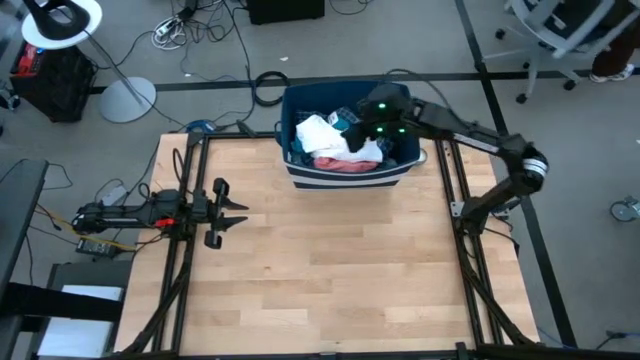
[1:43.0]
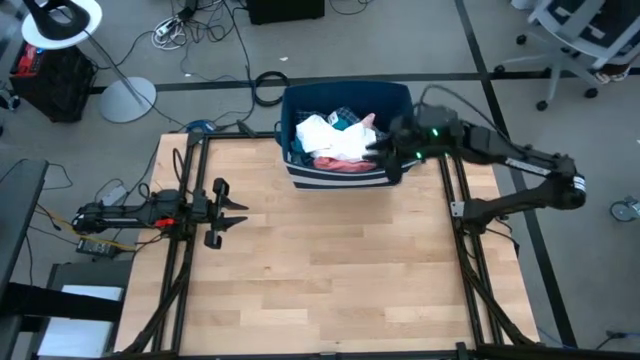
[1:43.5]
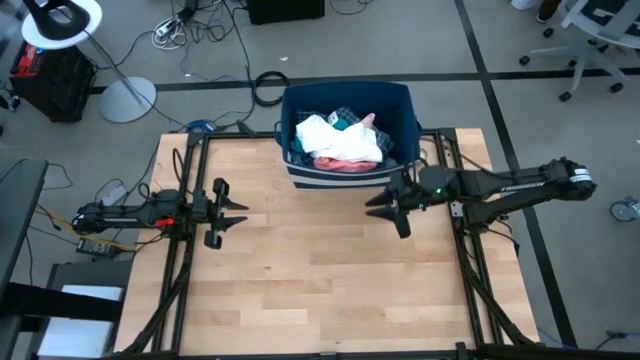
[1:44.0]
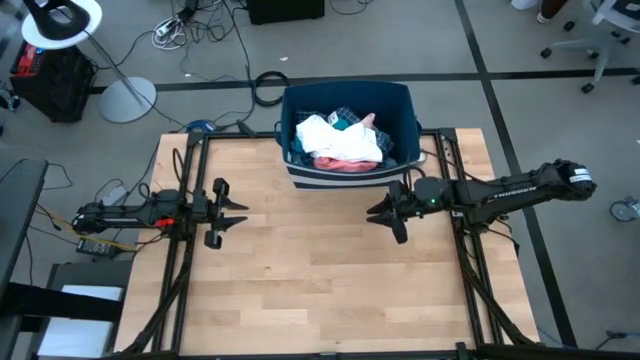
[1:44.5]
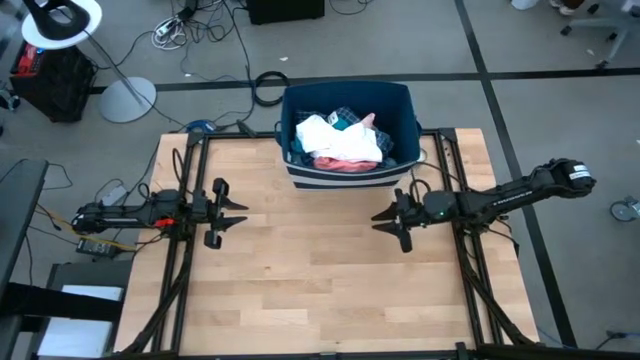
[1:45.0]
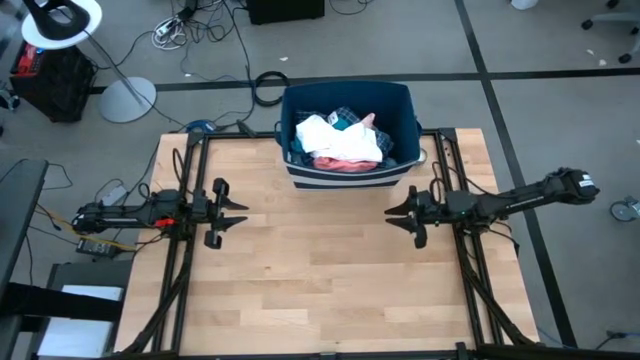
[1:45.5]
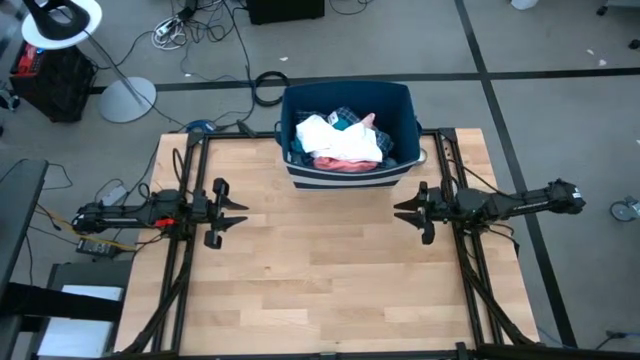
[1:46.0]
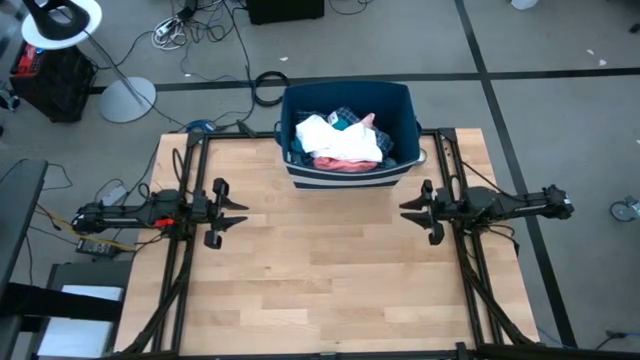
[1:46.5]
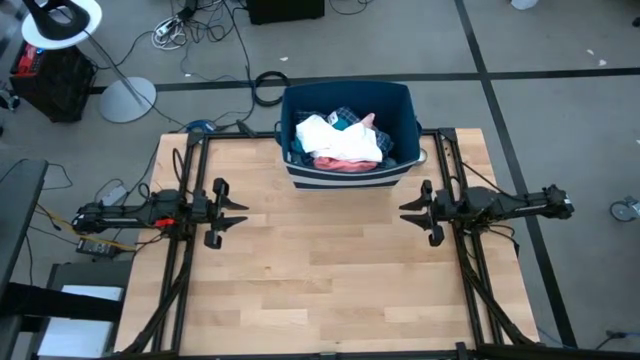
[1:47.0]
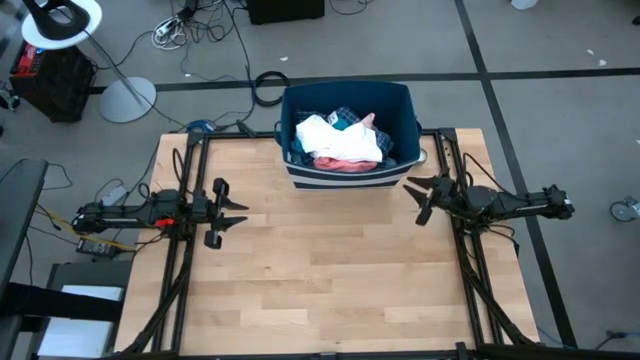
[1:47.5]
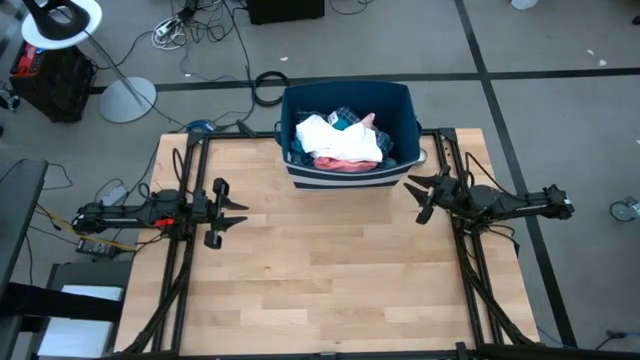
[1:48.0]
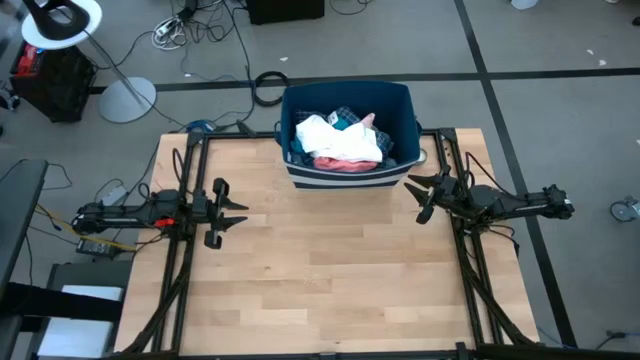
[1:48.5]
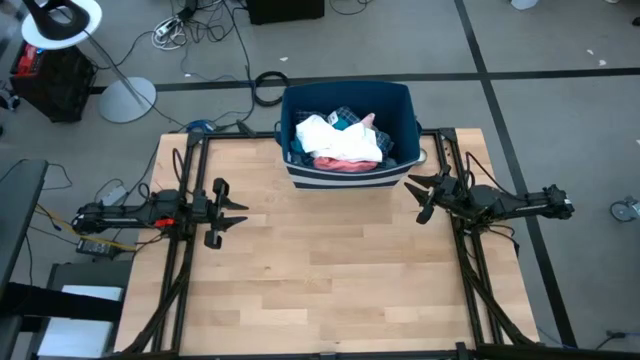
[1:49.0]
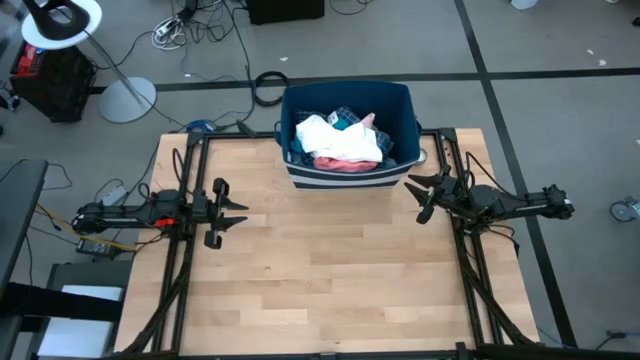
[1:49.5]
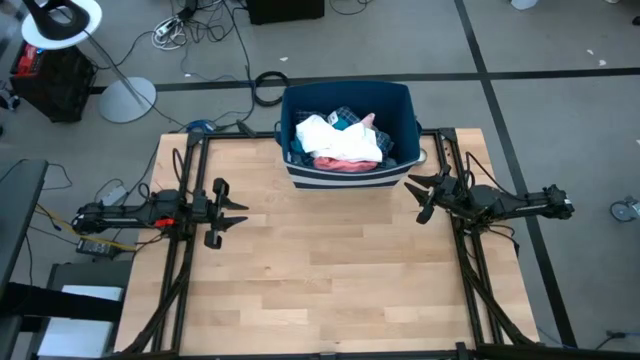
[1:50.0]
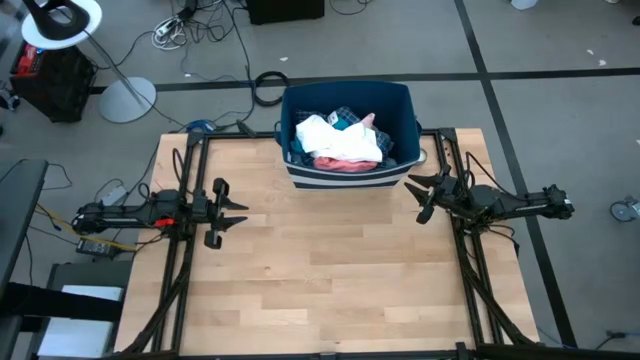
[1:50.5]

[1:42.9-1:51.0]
Task: Sort clothes
Return to Home Position

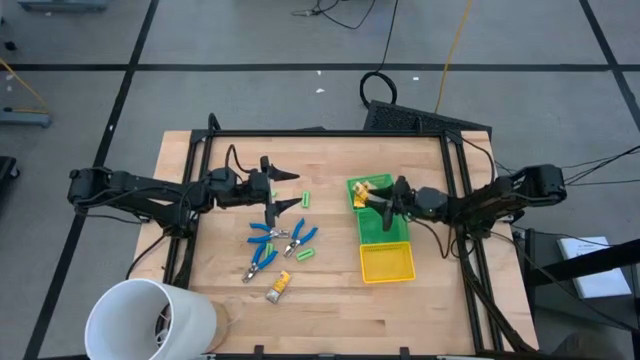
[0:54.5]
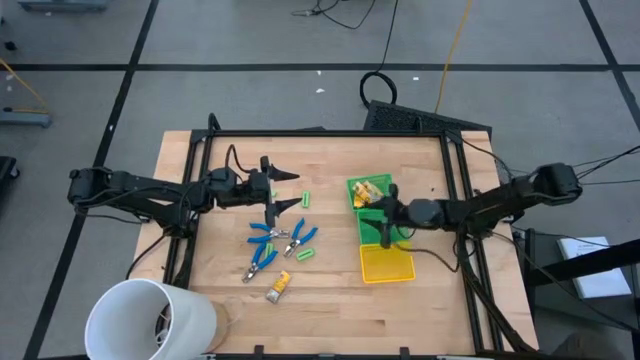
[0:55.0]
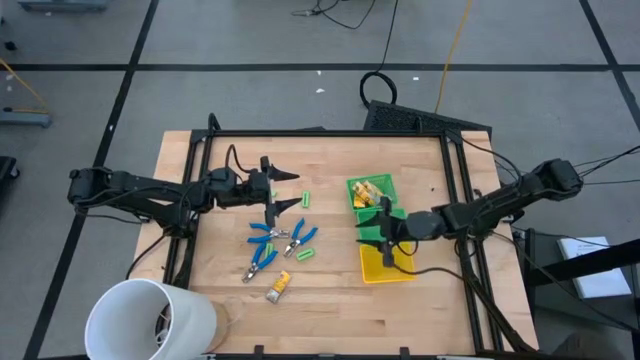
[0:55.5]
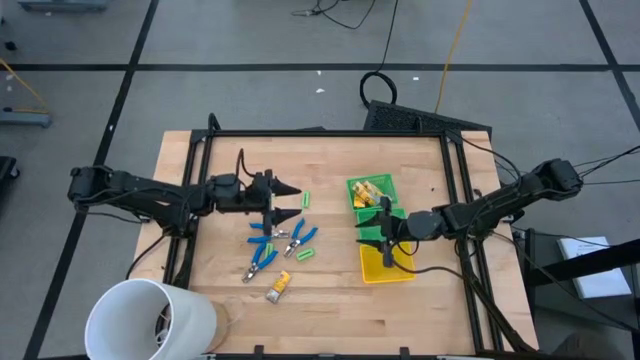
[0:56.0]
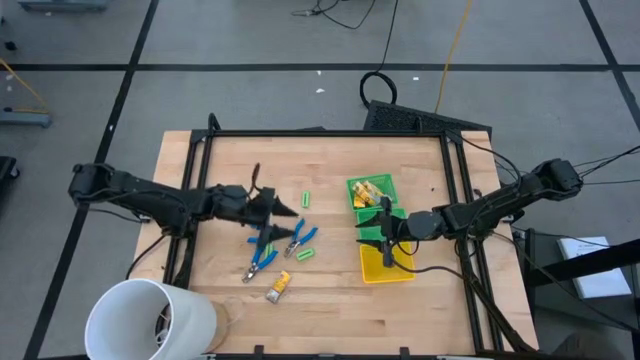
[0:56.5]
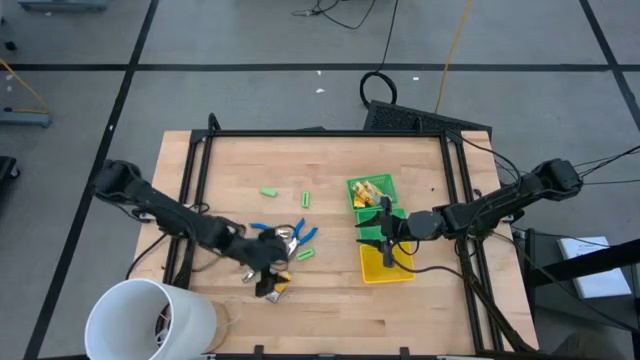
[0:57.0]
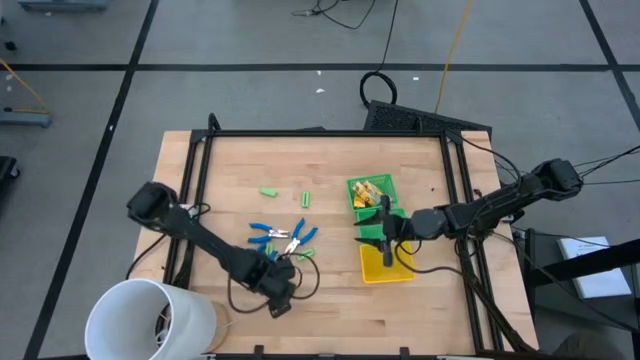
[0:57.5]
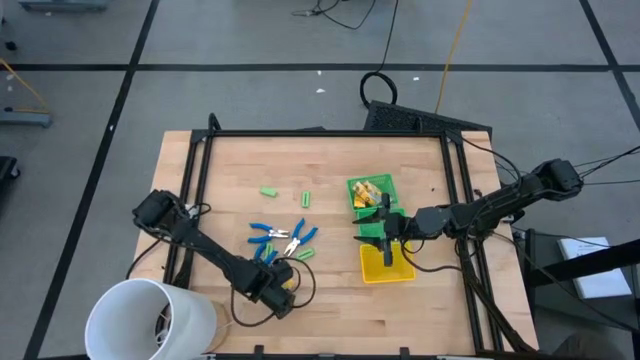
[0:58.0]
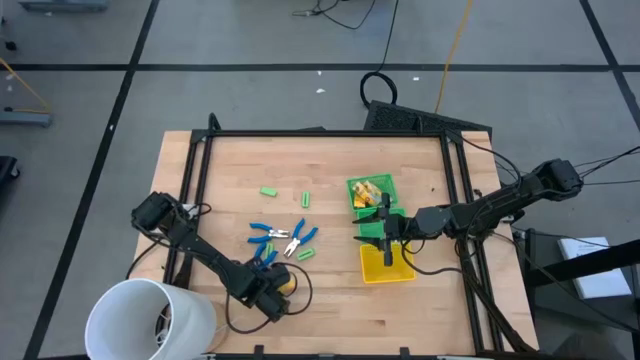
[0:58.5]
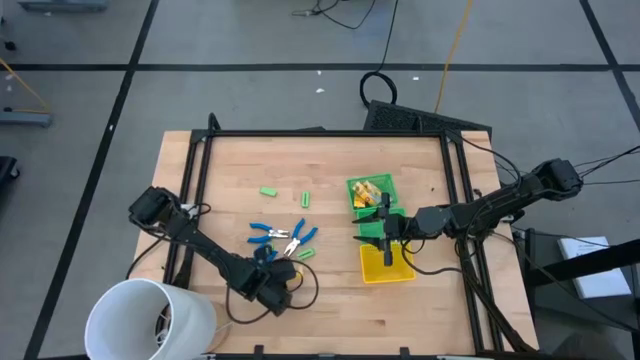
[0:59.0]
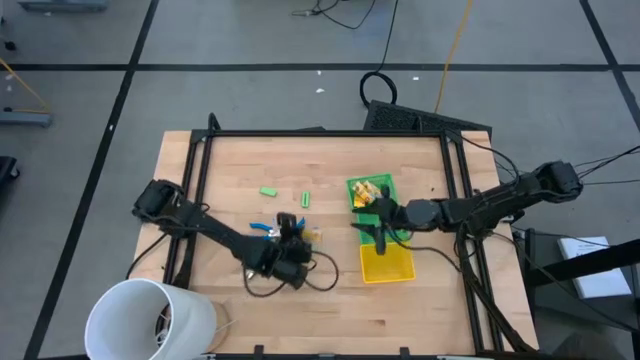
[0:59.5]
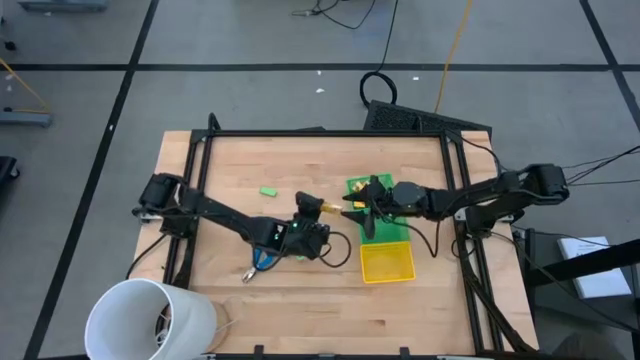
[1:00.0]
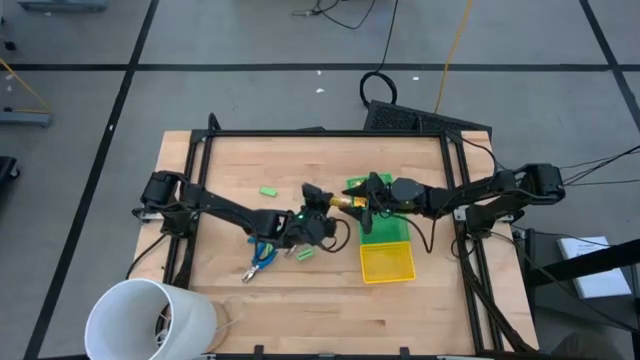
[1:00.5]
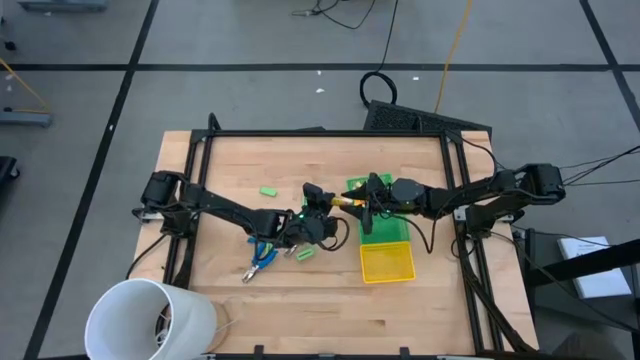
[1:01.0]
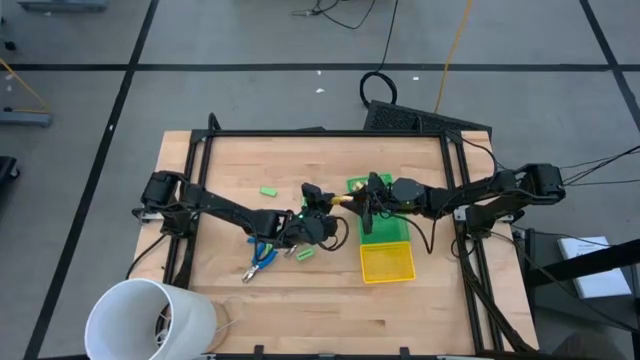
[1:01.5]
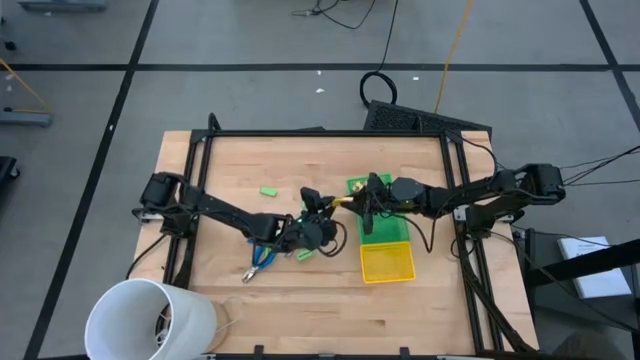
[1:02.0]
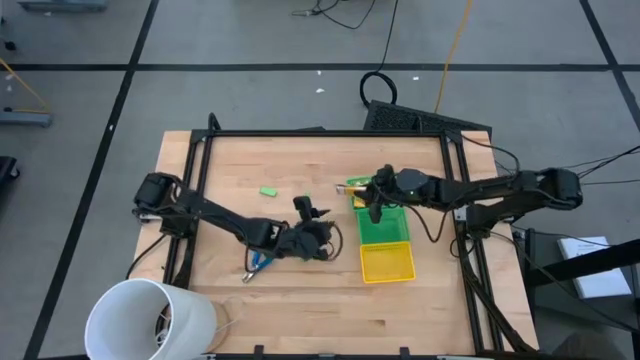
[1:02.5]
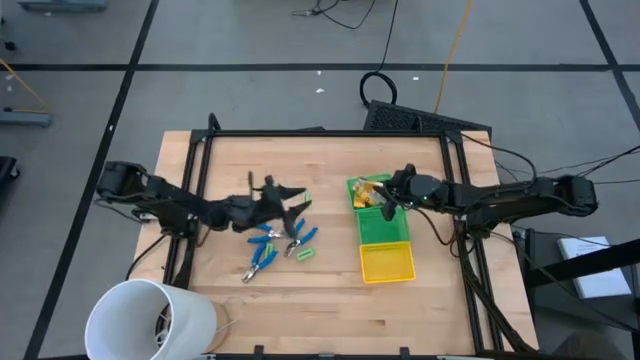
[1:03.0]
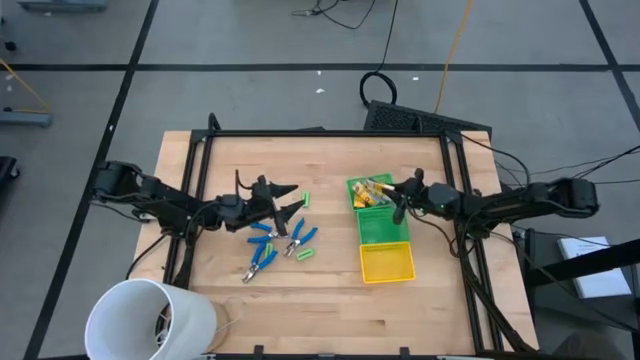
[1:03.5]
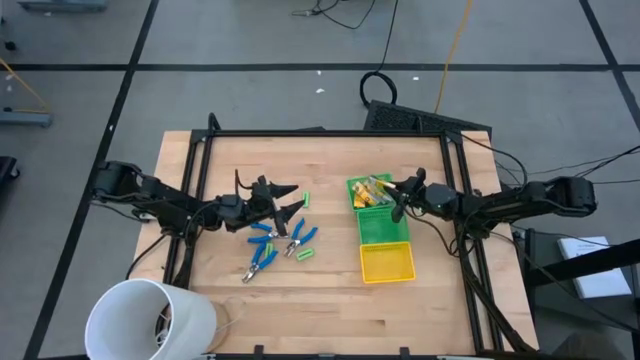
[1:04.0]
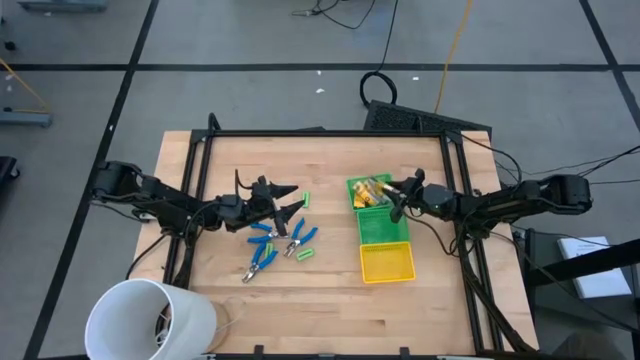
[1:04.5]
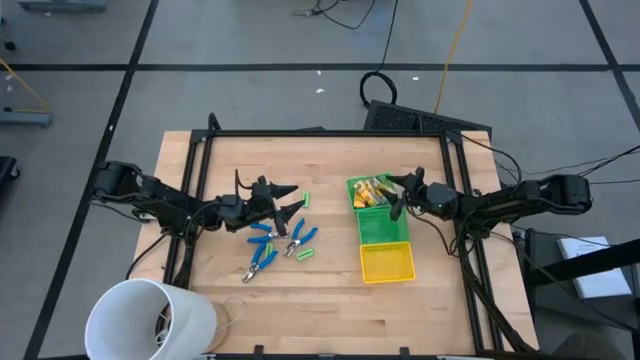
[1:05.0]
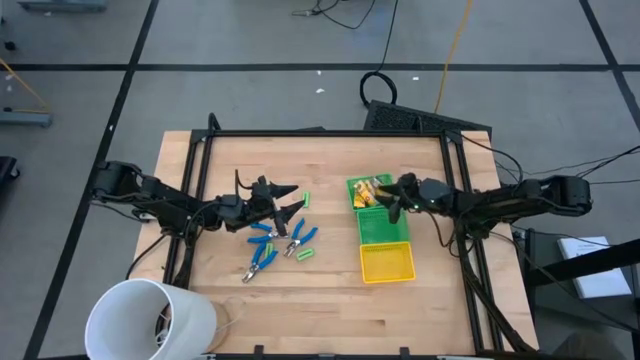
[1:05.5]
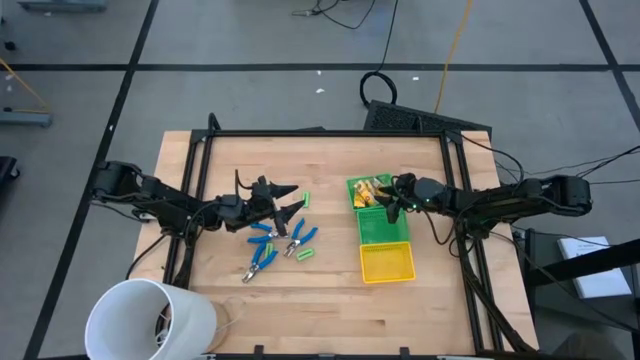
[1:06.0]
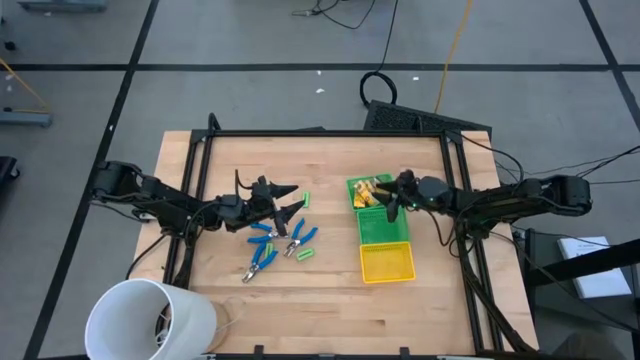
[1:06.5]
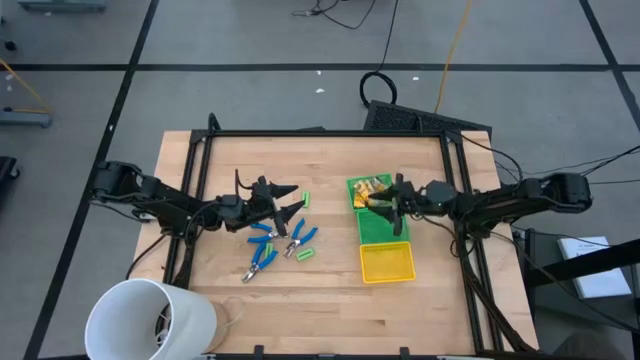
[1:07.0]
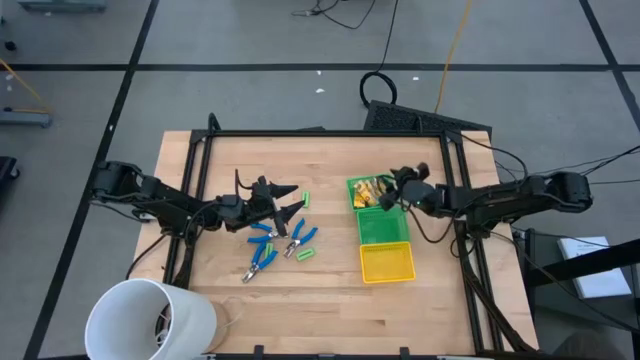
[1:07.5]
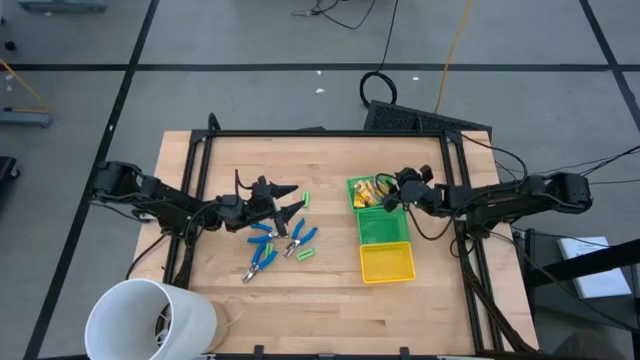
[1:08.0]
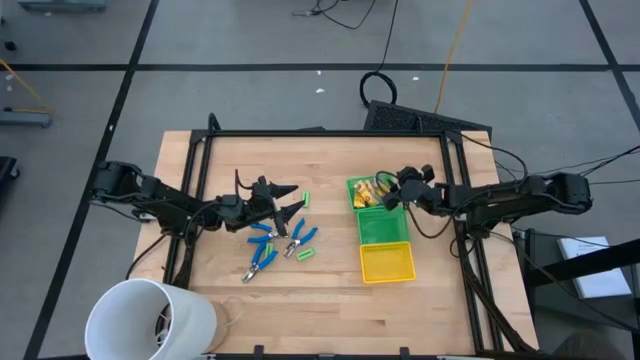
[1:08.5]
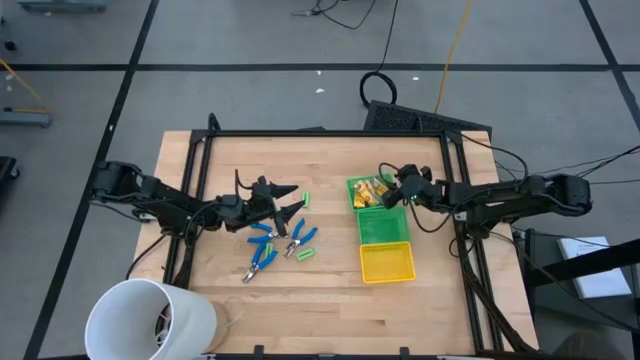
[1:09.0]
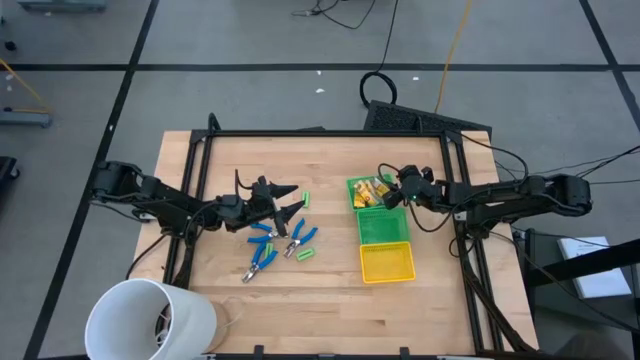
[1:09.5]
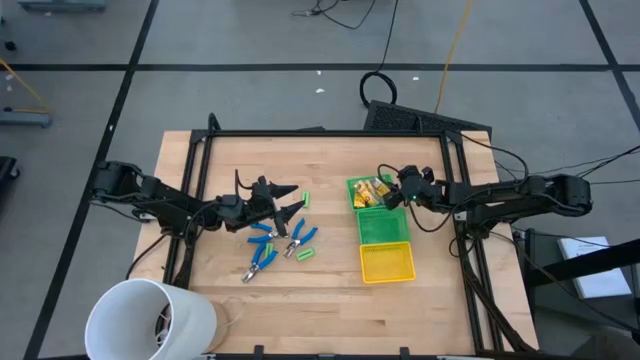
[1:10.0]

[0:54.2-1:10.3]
Task: Pick & Place School Supplies
Put the yellow crayon box into the top green bin
